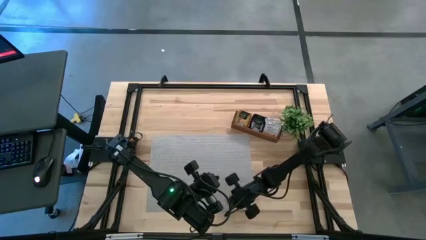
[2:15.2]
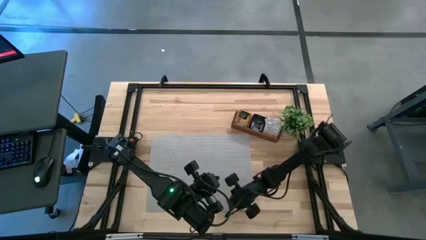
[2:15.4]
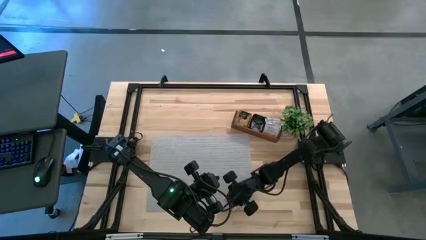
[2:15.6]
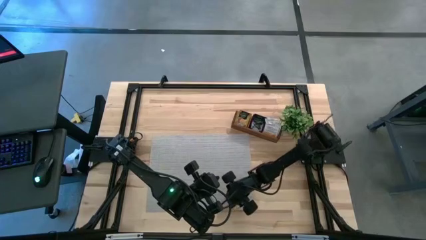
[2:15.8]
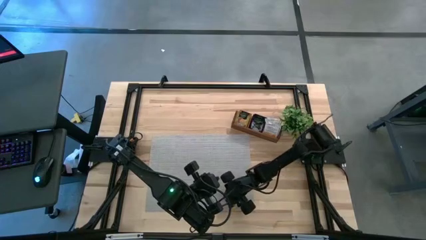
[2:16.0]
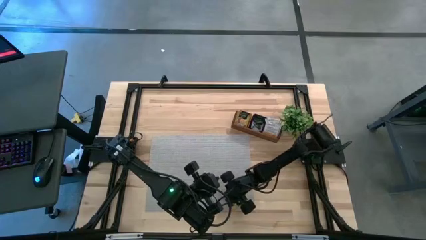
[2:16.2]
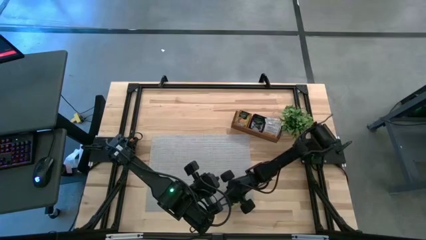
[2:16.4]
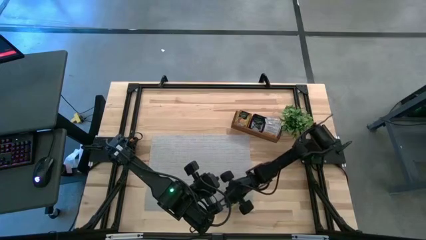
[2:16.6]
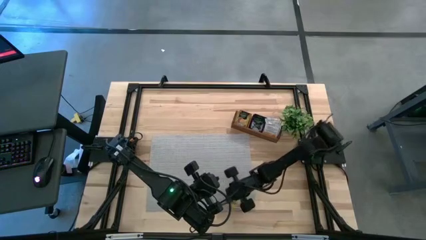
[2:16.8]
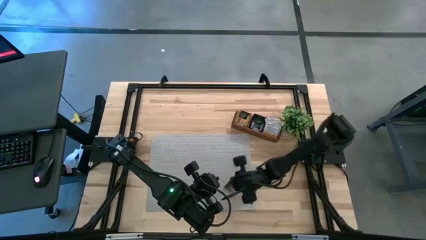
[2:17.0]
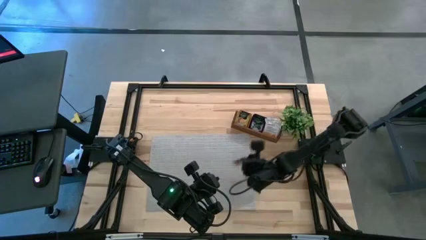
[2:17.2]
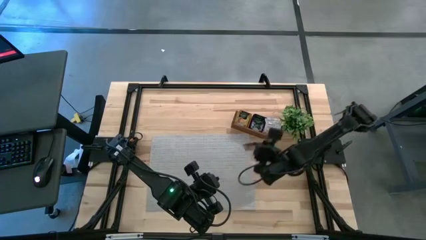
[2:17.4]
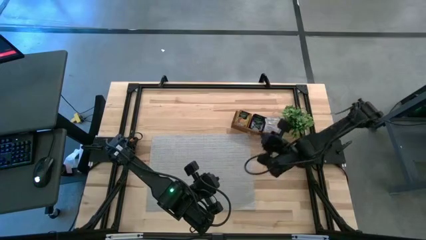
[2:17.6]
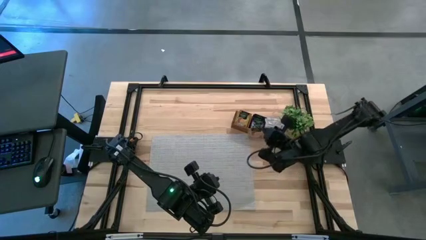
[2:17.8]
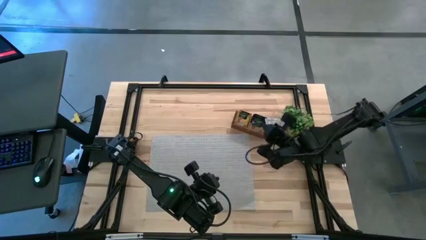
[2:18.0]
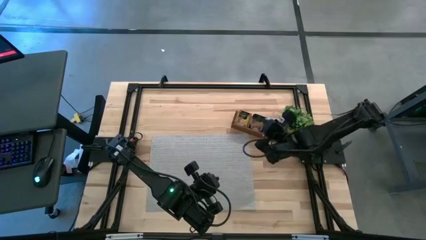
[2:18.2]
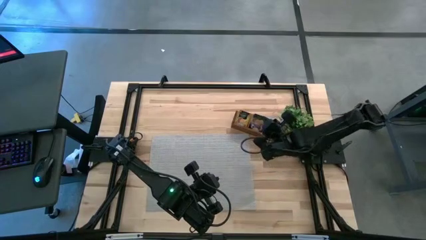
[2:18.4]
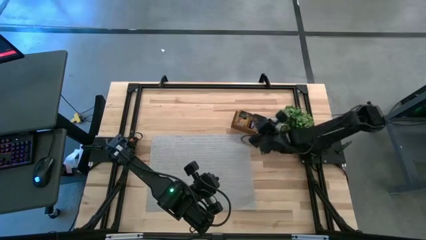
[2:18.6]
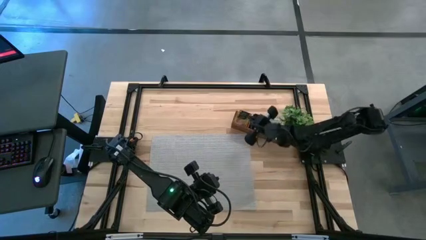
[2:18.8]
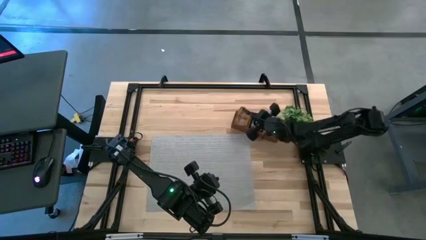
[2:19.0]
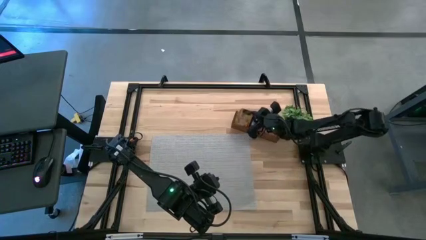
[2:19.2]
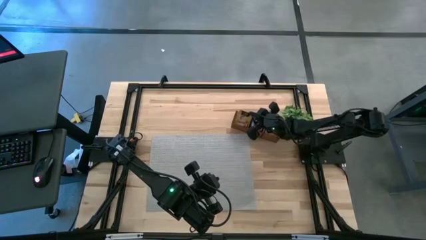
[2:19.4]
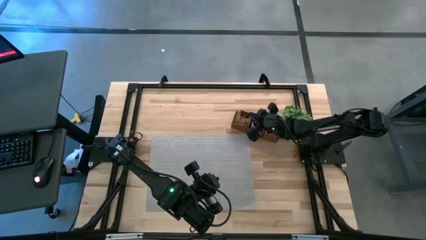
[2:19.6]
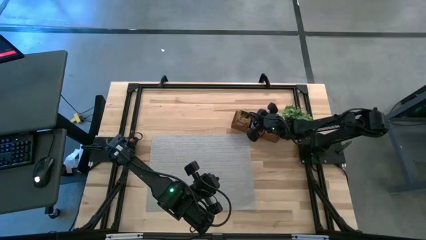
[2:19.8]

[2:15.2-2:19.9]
Task: Pick & Place Tea
Put the yellow tea bag in the left section of the wooden organizer

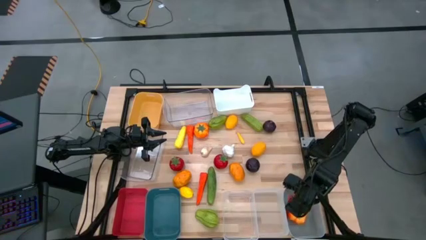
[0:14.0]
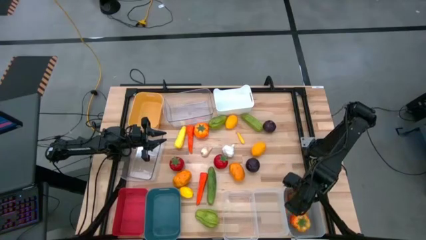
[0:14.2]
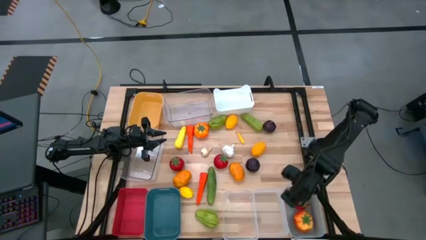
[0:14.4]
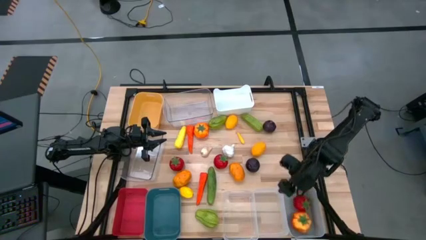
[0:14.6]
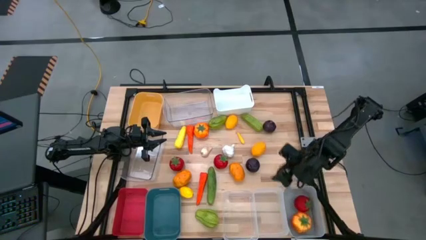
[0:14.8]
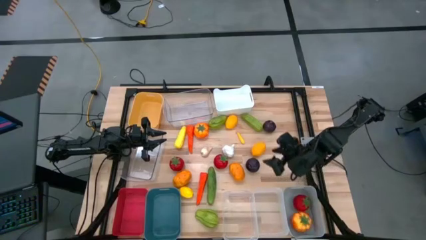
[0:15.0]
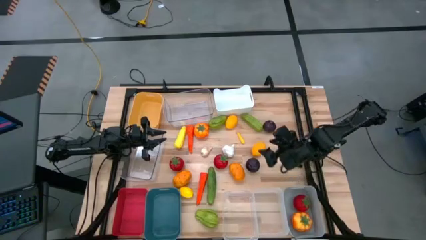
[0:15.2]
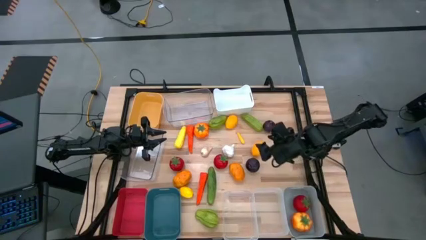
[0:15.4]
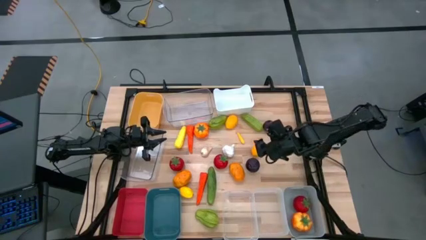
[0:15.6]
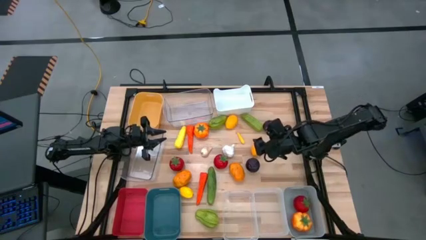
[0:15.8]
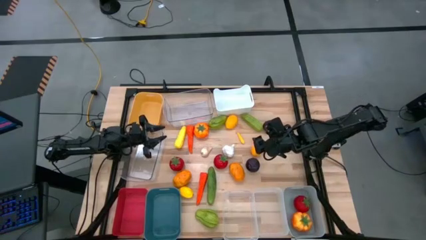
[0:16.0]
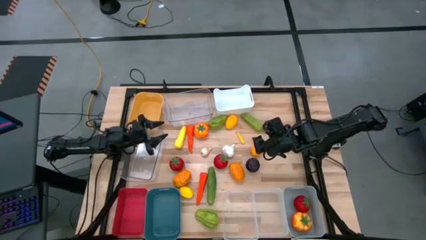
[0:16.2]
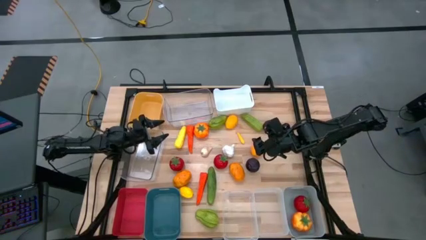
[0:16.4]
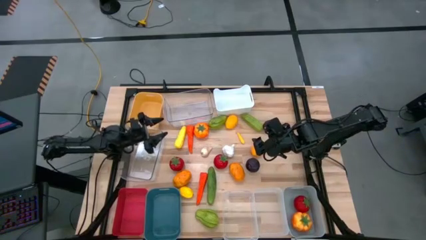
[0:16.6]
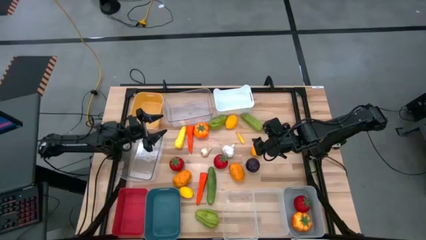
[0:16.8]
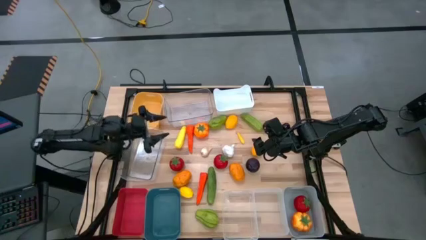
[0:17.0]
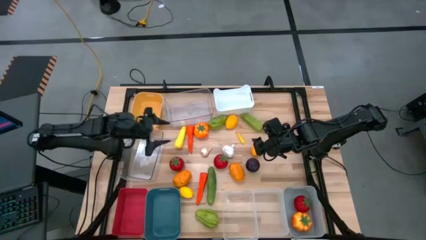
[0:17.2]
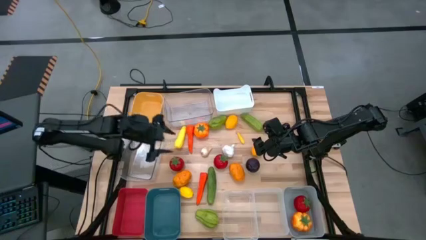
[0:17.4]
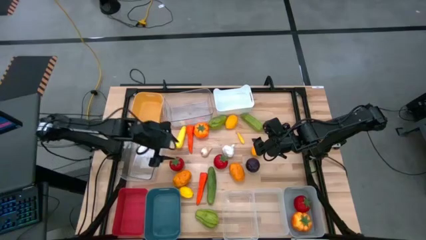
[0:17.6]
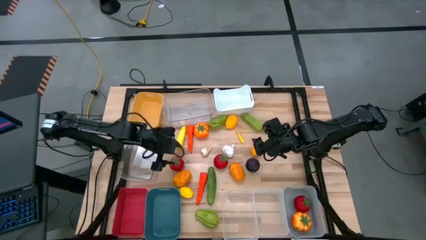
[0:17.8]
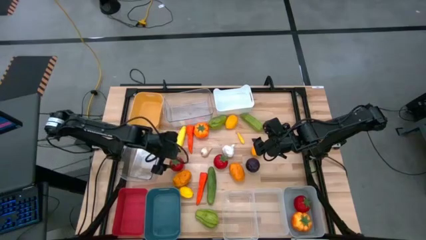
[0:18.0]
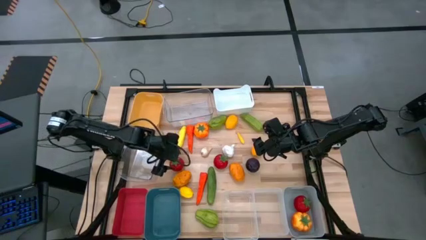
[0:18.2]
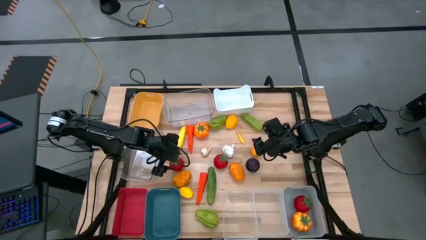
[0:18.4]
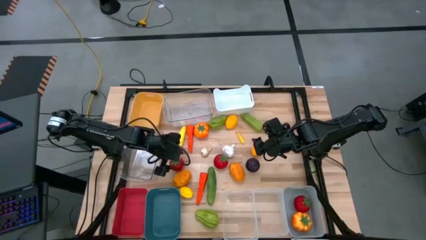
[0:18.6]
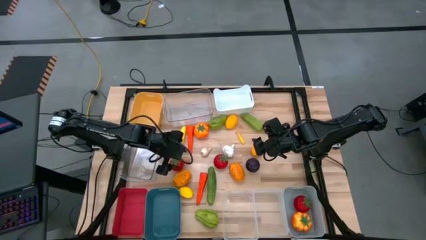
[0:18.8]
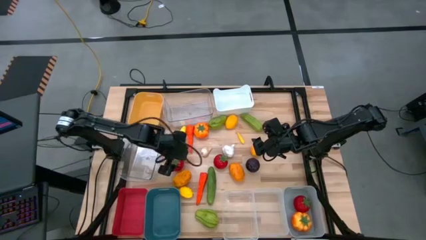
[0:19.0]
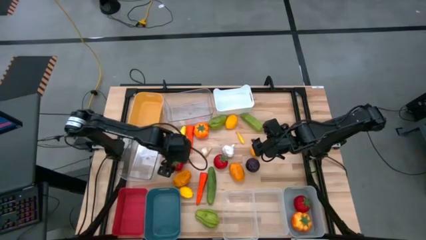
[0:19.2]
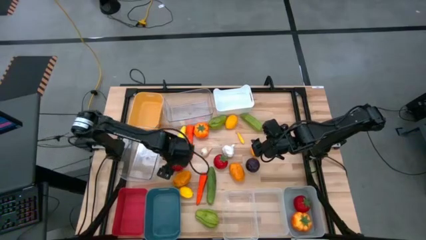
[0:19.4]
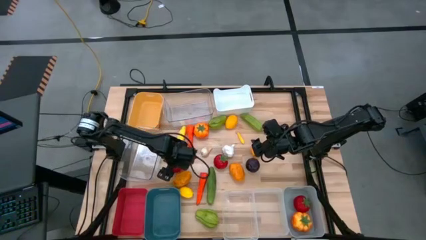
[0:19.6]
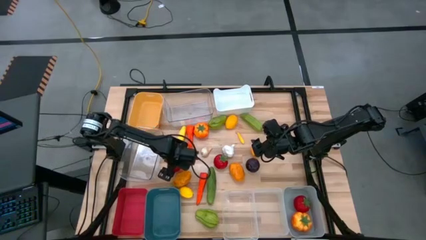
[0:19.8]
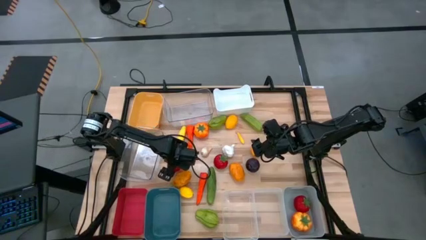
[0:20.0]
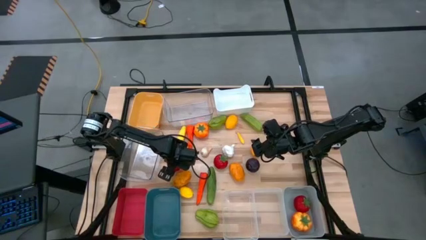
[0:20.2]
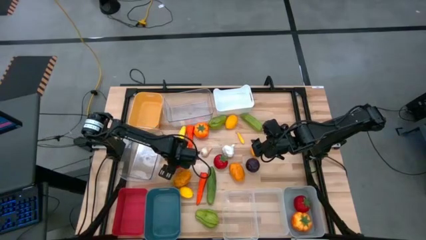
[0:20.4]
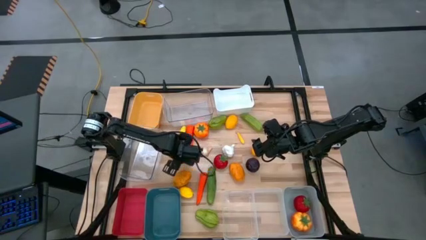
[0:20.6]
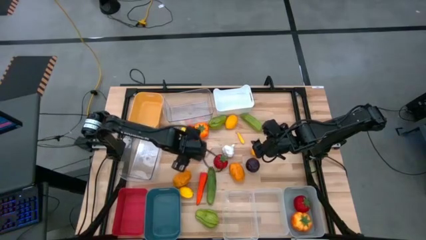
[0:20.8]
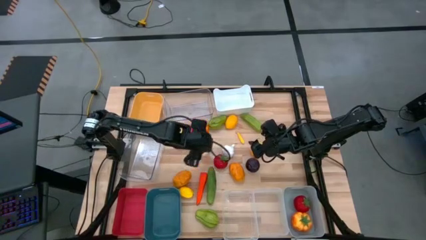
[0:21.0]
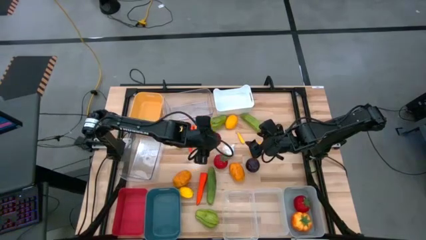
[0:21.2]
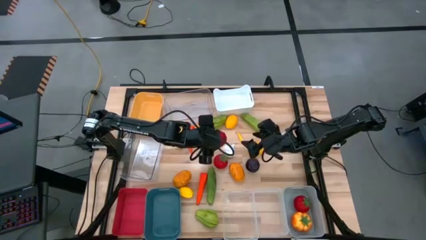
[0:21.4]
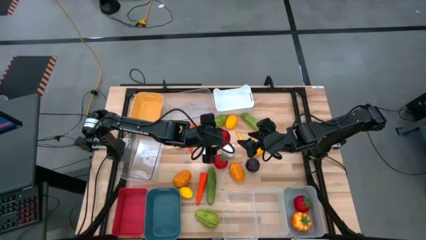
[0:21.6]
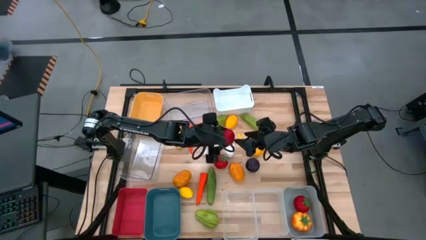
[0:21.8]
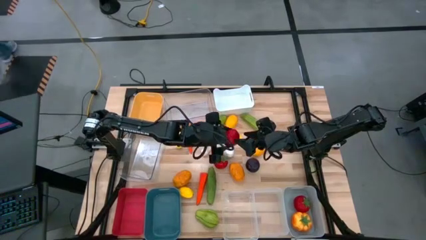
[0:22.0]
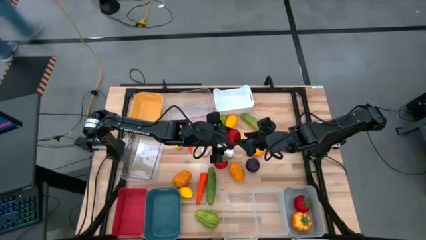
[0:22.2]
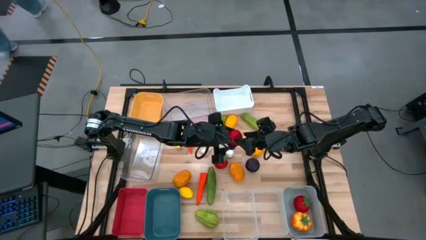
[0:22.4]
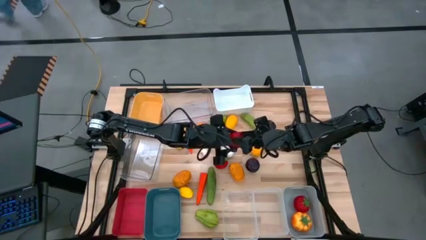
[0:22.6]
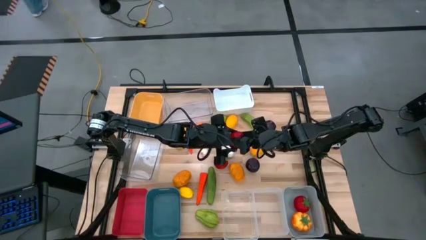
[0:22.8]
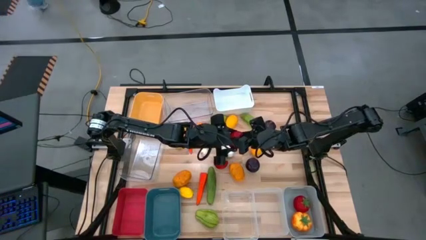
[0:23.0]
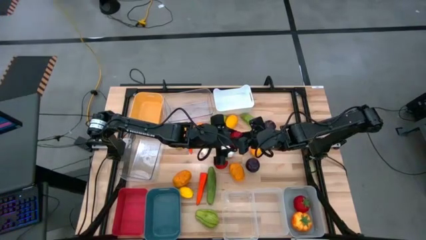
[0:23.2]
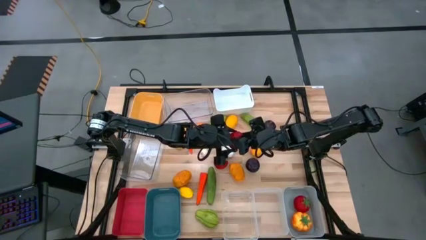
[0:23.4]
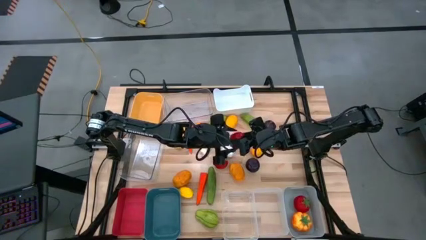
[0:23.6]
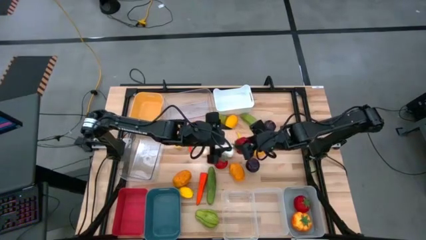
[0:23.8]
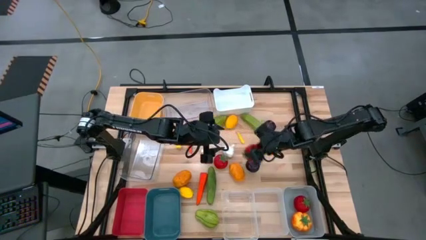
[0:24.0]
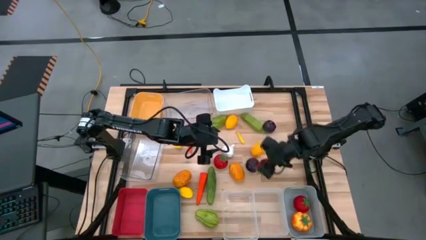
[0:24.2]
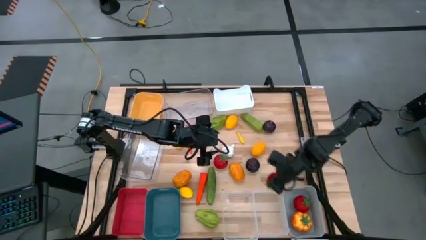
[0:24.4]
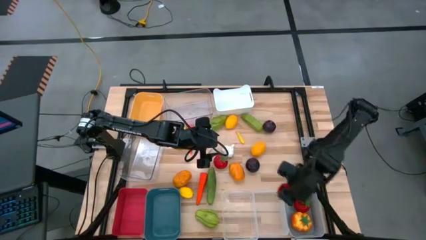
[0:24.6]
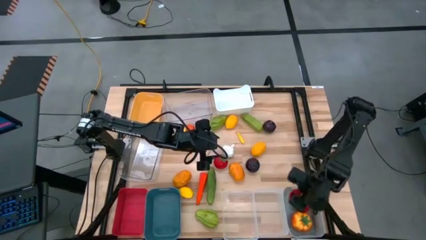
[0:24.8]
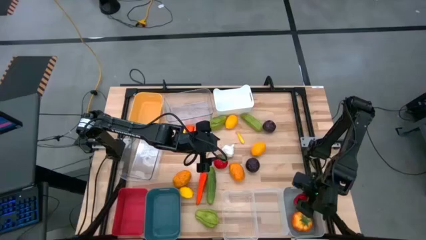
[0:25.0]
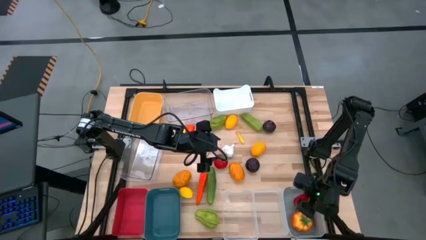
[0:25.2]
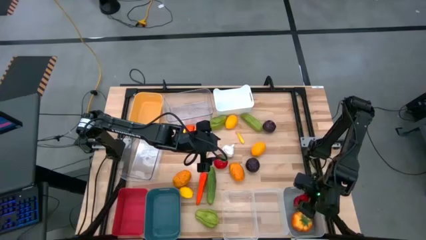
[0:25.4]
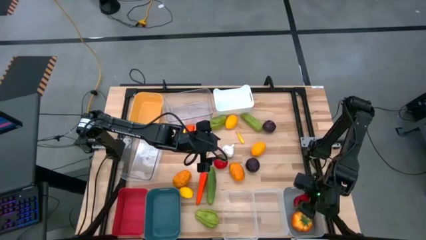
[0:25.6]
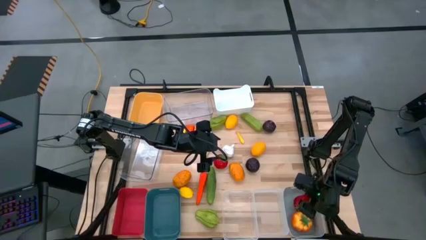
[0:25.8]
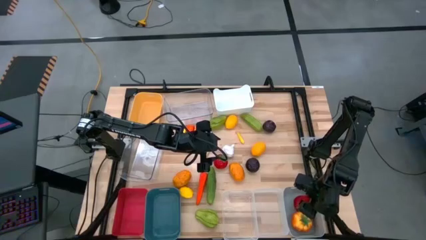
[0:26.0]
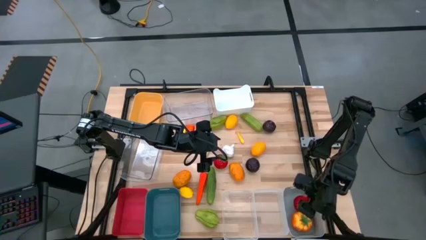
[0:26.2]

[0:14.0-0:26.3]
Task: Sort produce into baskets
Put the left red tomato into the gray bin
